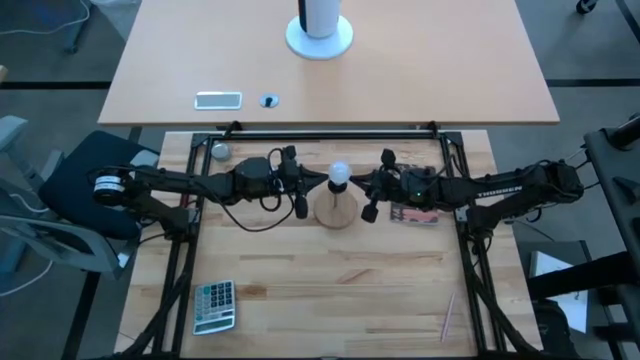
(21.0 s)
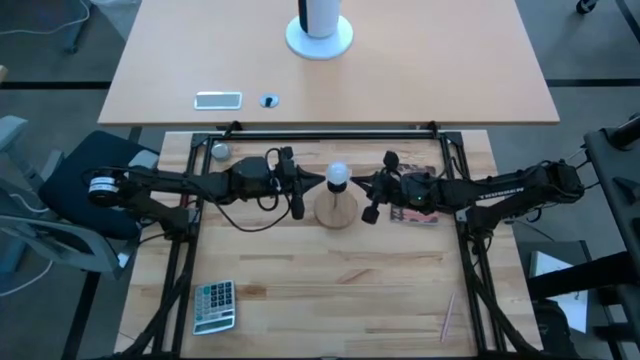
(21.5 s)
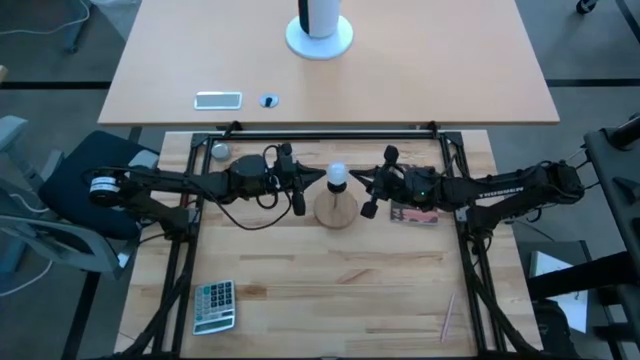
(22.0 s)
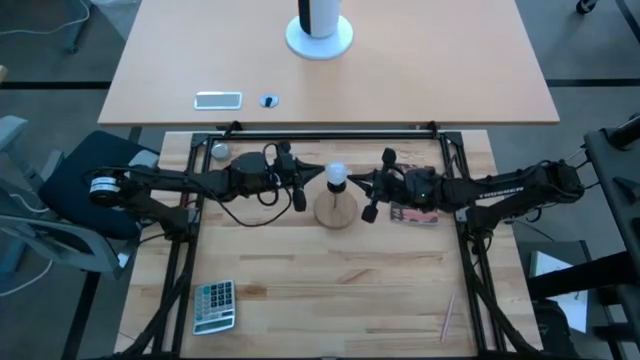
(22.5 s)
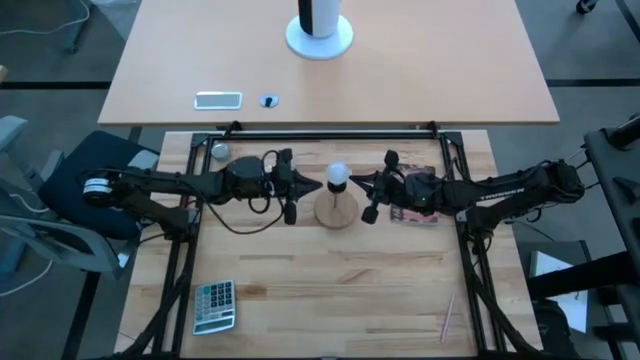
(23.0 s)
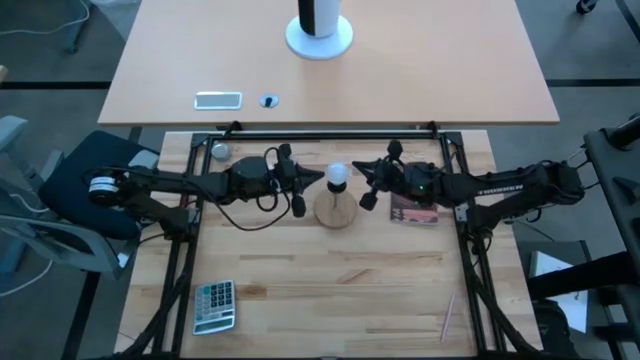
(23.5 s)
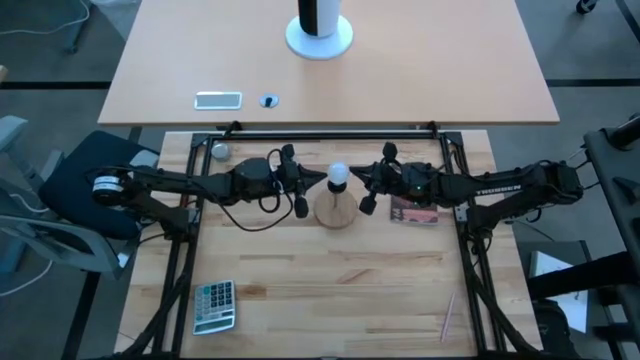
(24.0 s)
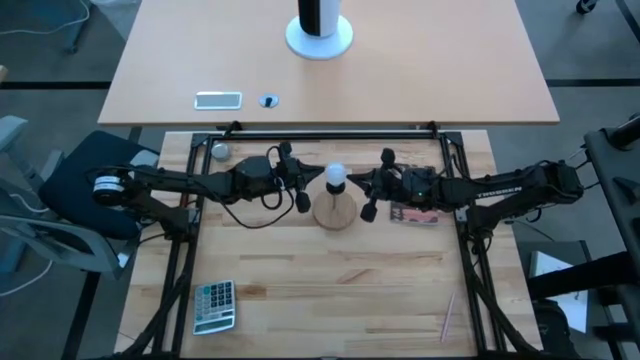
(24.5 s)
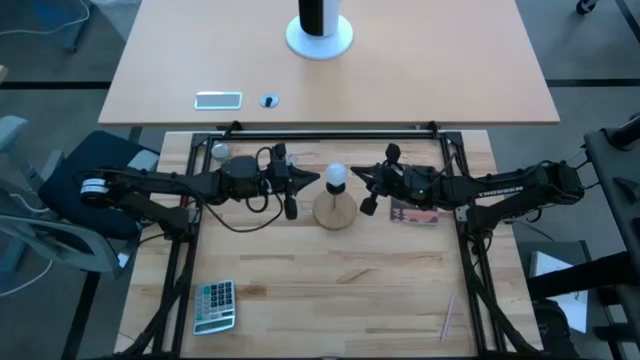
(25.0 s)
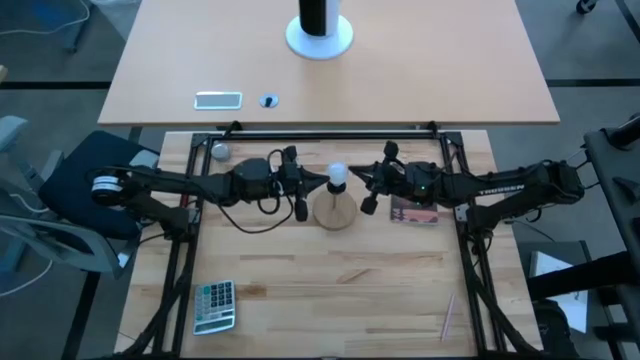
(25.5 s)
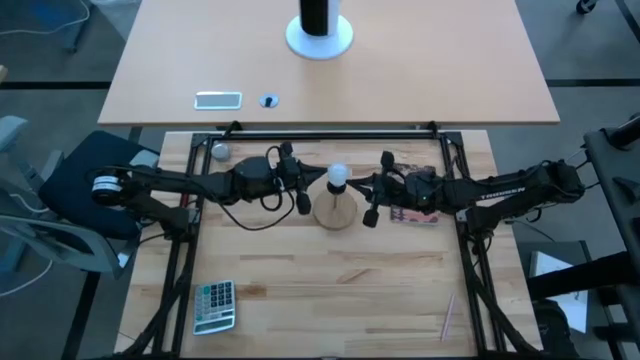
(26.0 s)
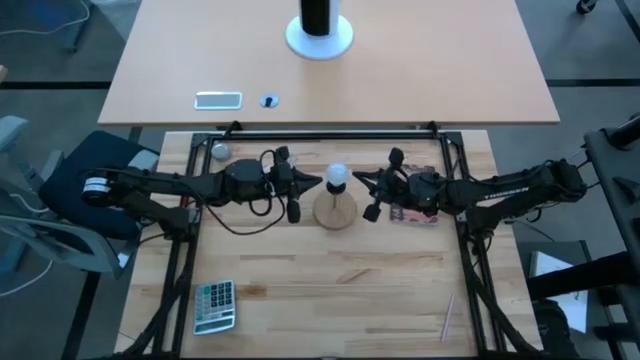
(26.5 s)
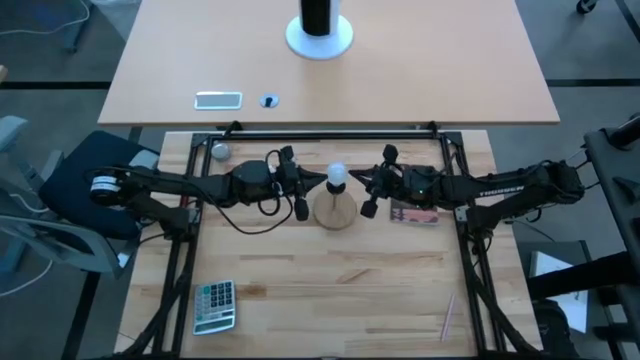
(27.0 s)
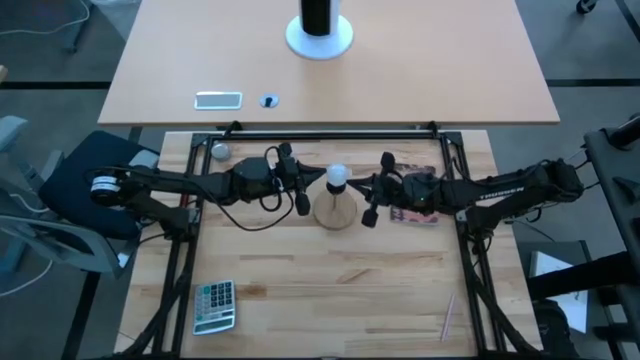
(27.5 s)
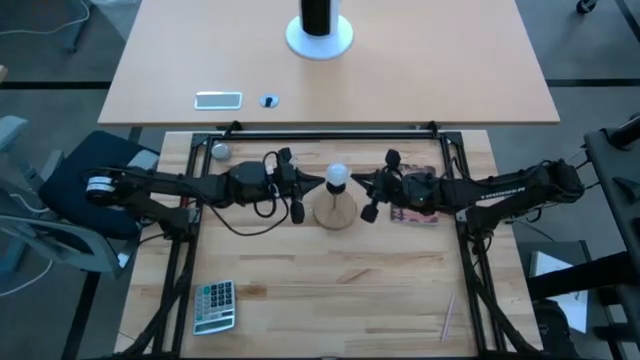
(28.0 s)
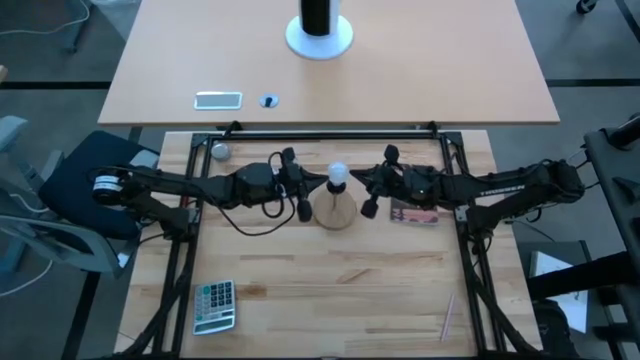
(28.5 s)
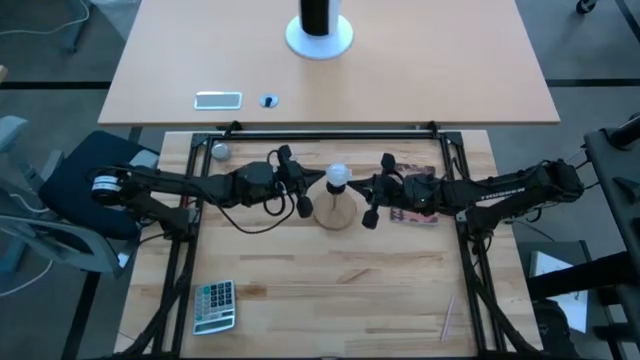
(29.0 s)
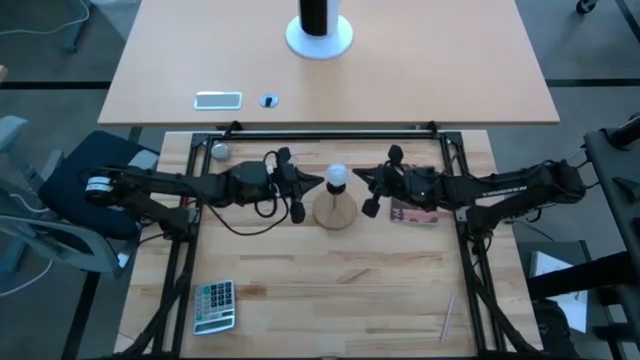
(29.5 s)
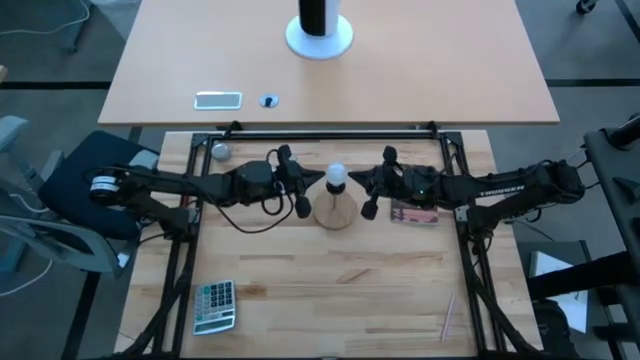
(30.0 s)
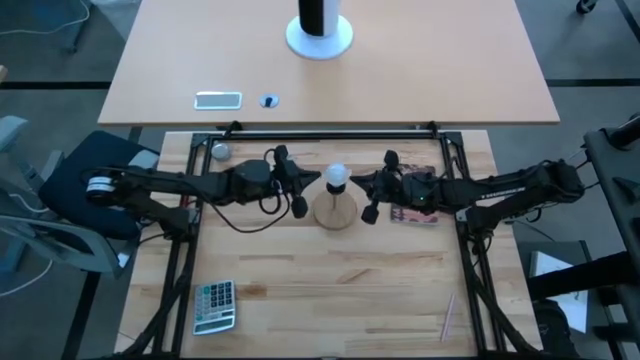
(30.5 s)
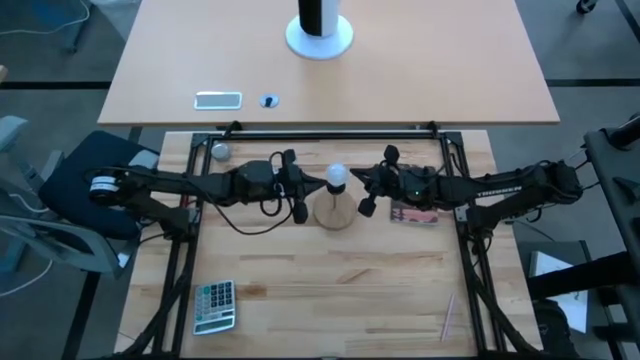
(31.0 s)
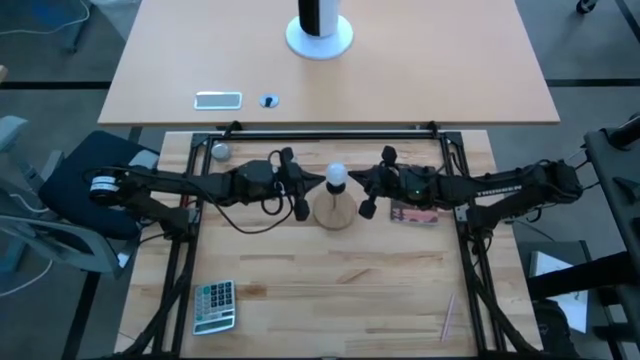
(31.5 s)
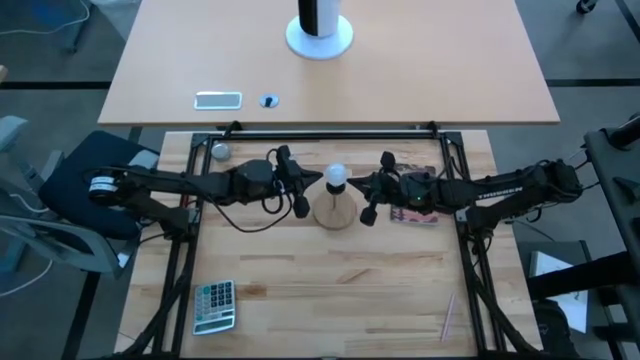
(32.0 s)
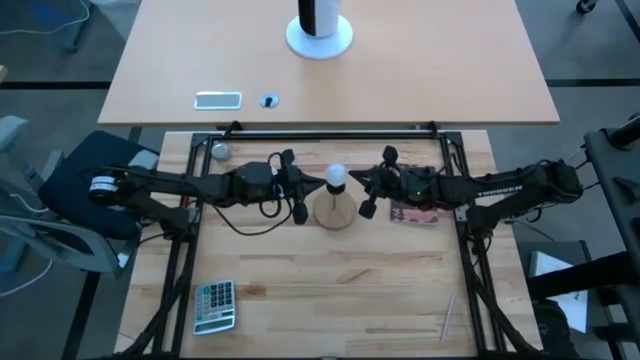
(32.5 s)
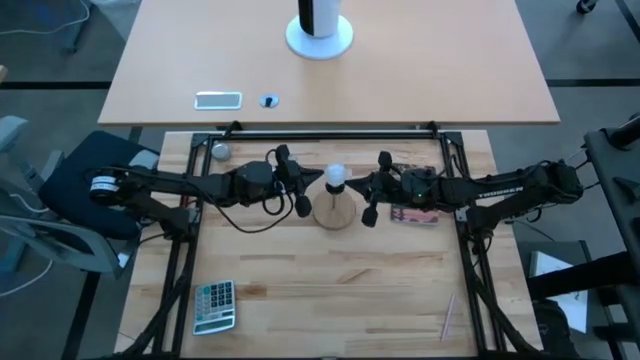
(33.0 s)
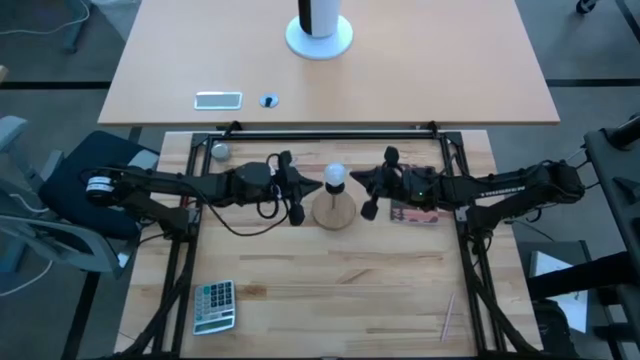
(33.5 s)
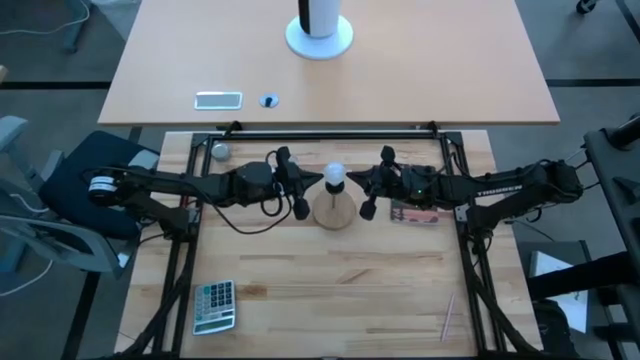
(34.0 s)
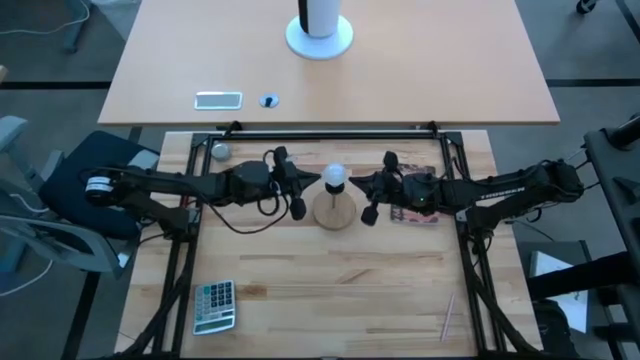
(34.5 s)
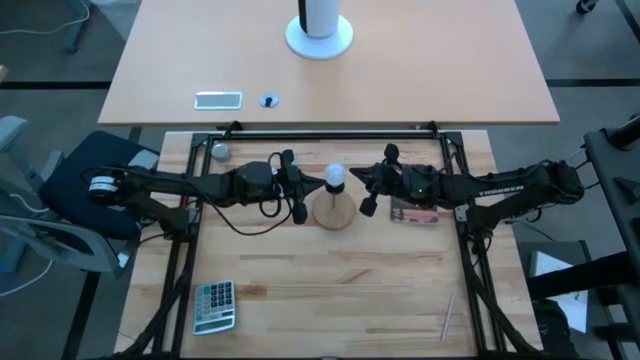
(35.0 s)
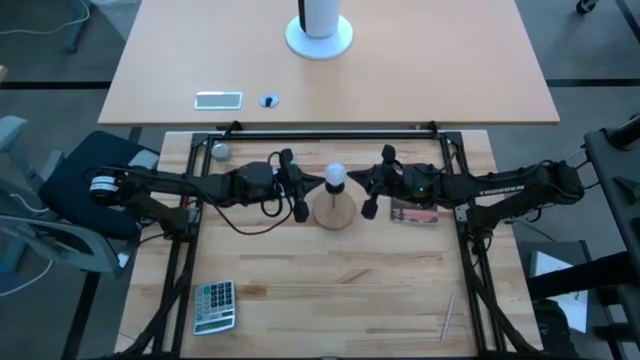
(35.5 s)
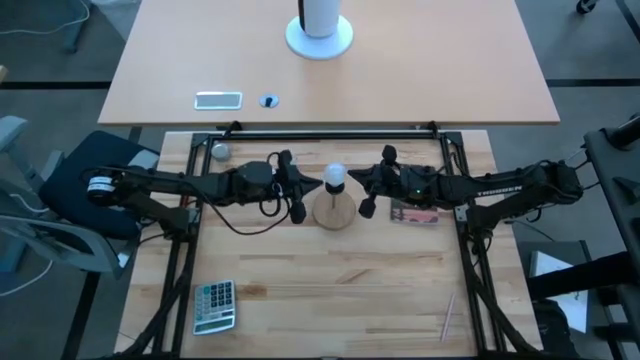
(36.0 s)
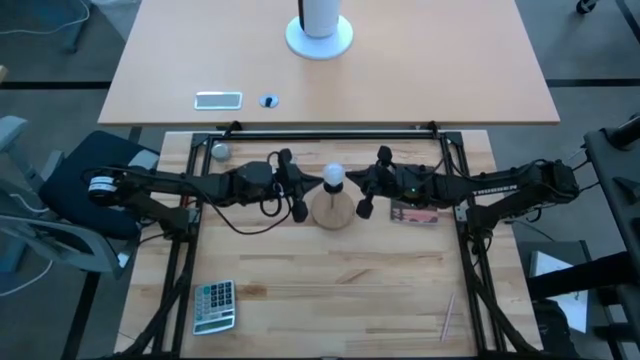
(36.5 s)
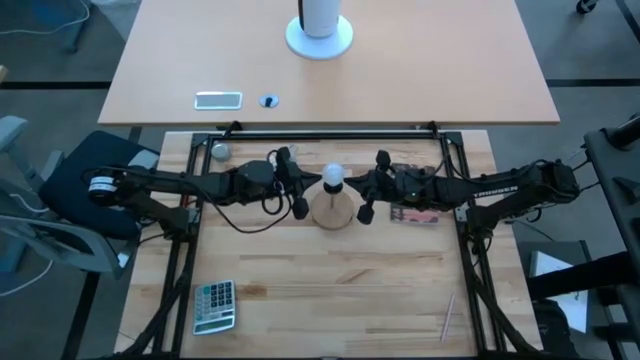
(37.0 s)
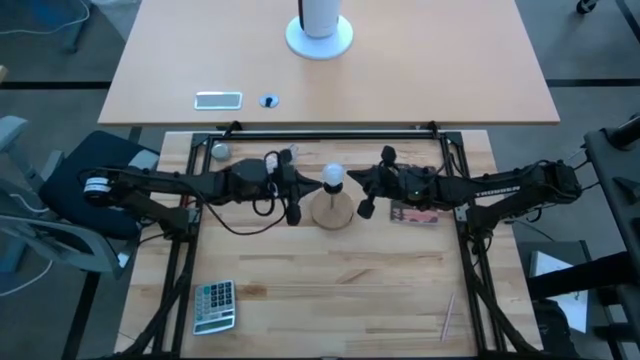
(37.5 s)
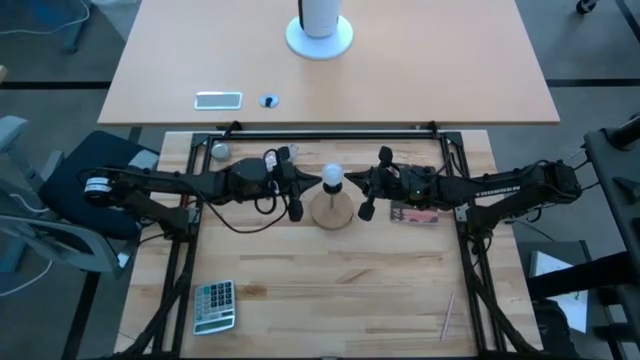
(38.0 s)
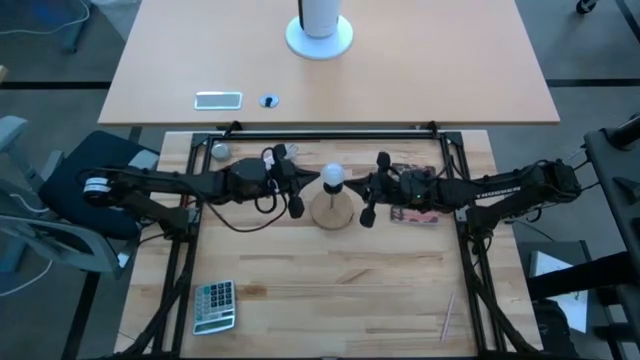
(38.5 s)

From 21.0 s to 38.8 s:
Task: Screw lightbulb
Insert the lightbulb into the lamp

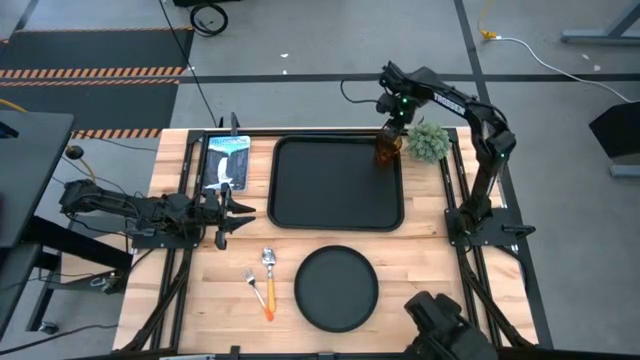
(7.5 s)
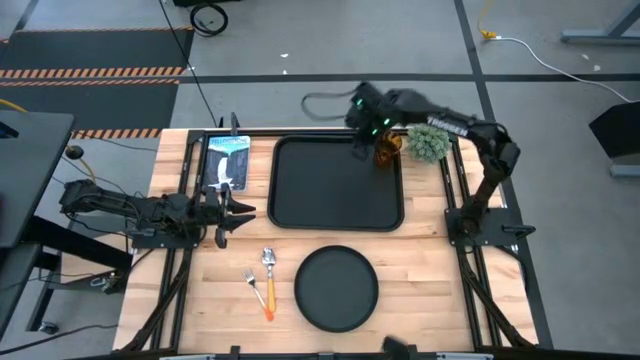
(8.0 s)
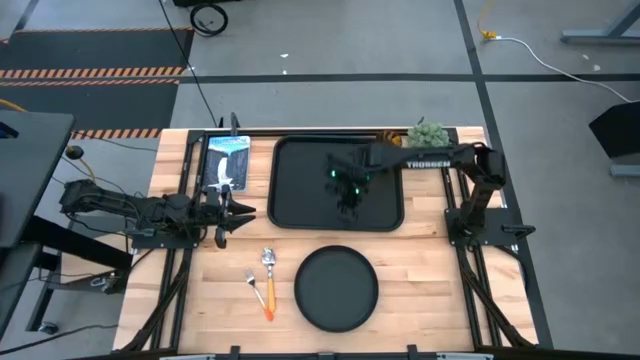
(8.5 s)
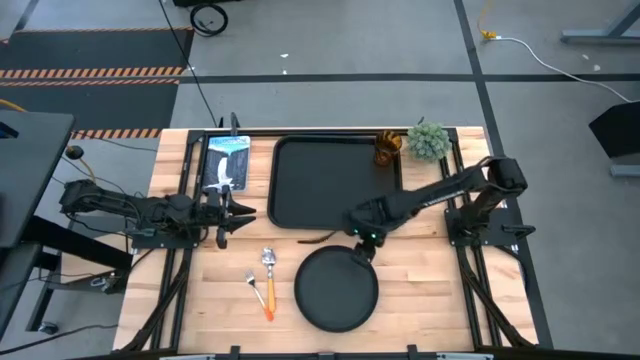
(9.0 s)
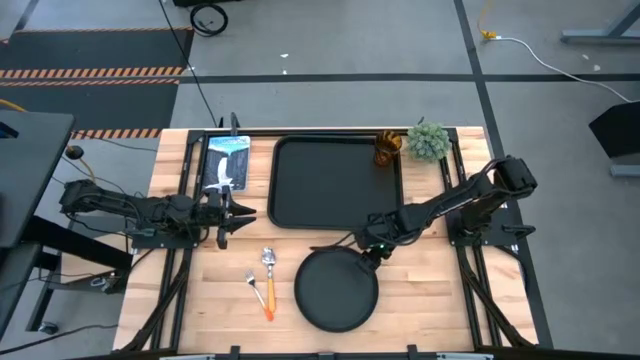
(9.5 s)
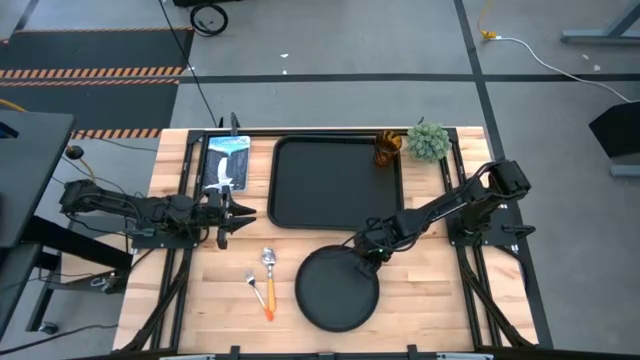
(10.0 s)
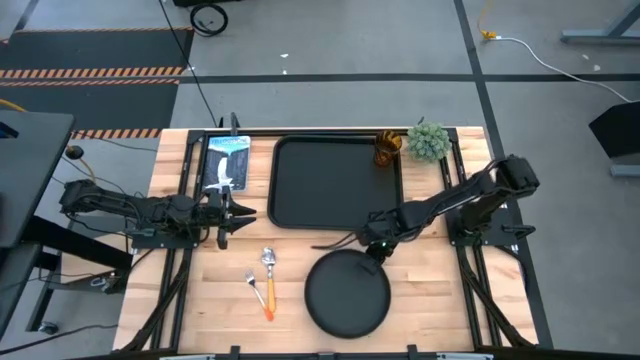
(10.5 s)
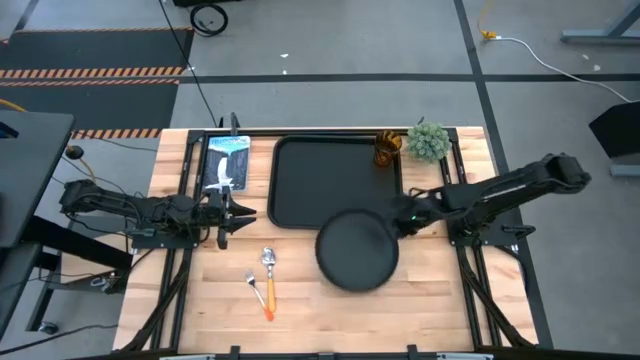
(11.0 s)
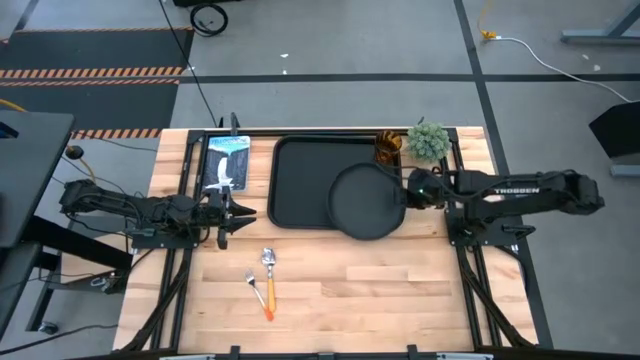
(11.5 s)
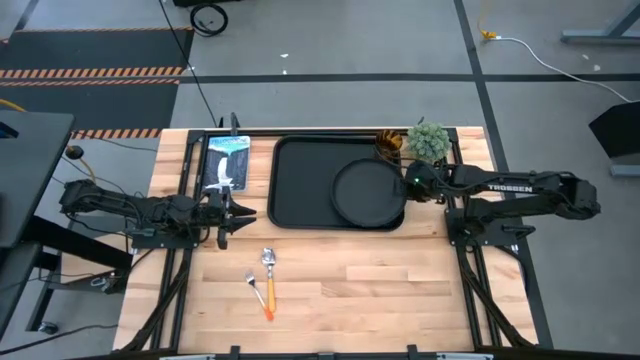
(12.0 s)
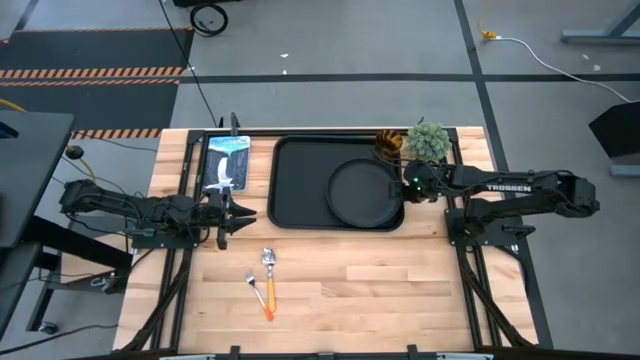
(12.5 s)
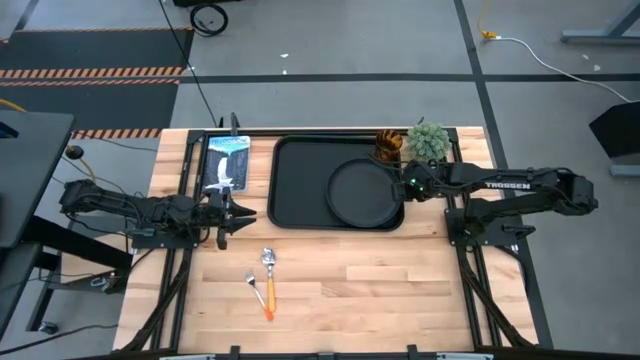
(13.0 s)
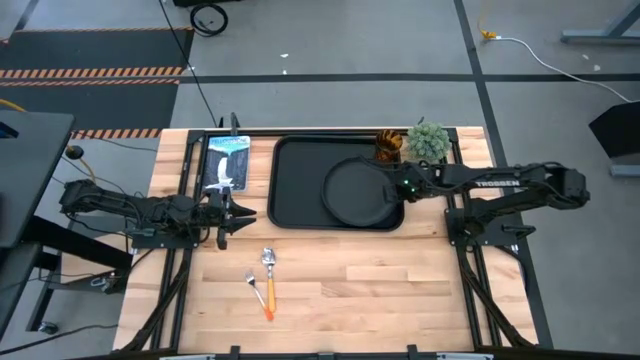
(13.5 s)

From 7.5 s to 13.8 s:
Task: Pick and place plate/cup/fork/spoon on tray
Put the black plate under the brown cup on the black tray
